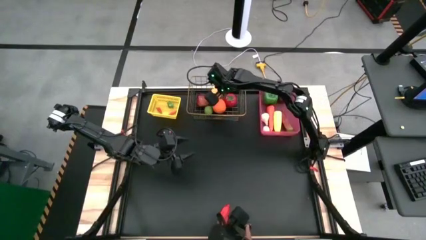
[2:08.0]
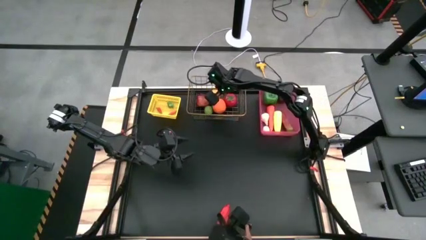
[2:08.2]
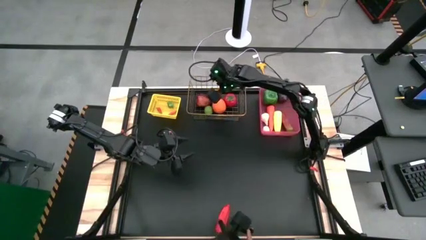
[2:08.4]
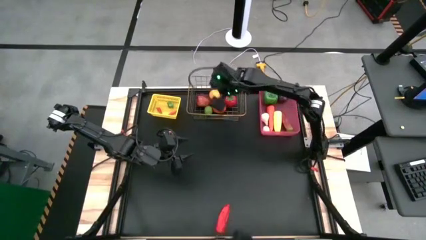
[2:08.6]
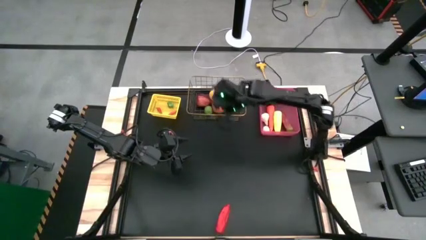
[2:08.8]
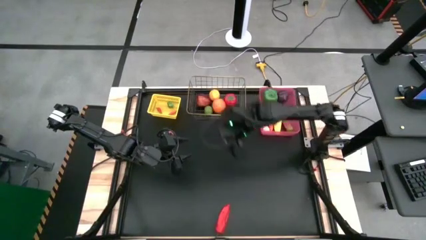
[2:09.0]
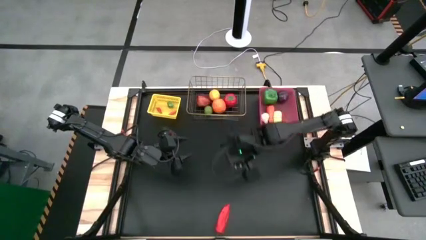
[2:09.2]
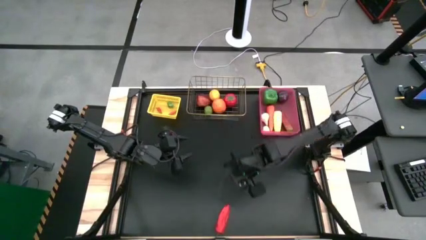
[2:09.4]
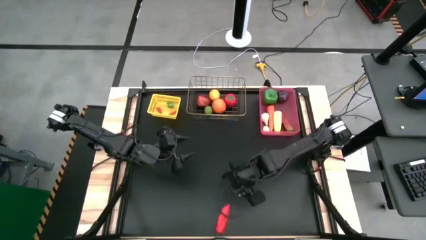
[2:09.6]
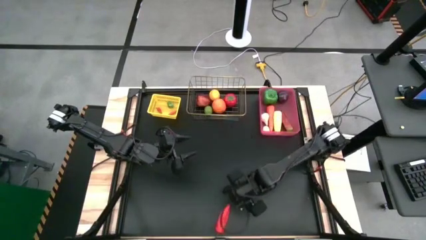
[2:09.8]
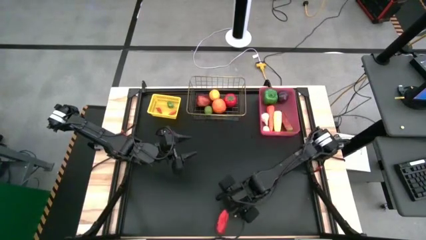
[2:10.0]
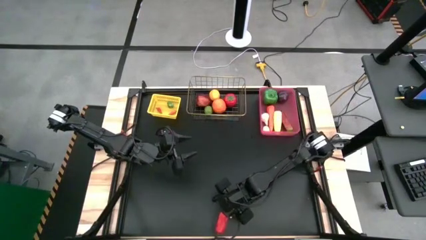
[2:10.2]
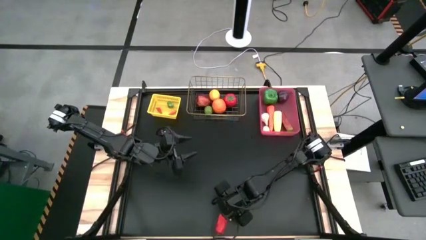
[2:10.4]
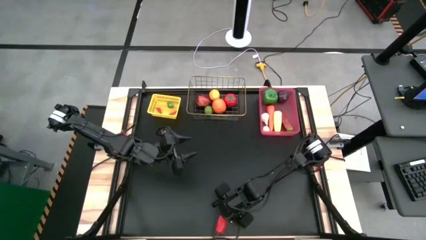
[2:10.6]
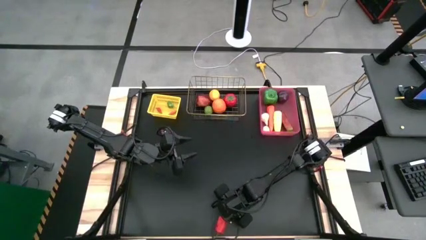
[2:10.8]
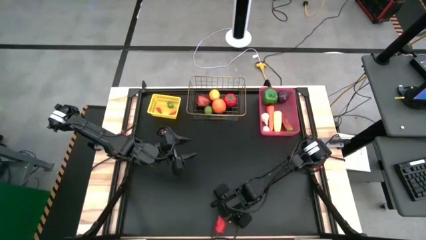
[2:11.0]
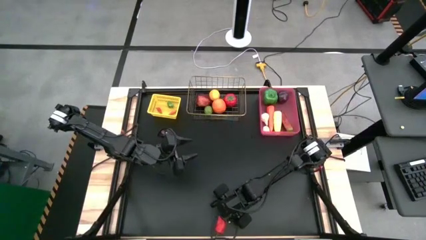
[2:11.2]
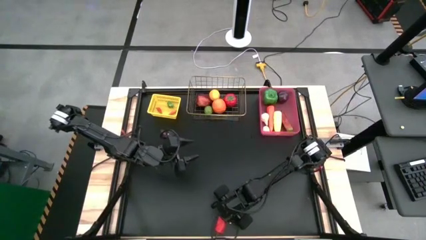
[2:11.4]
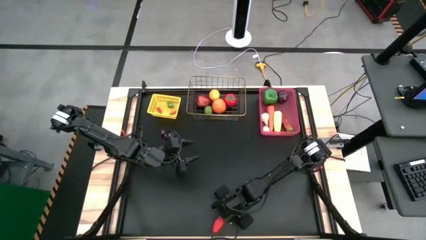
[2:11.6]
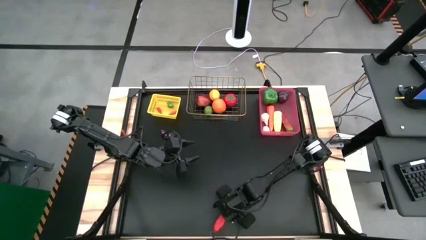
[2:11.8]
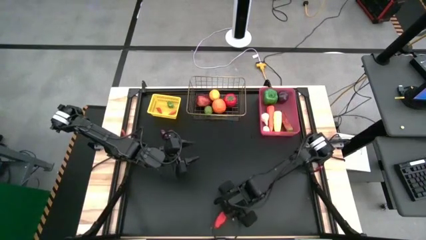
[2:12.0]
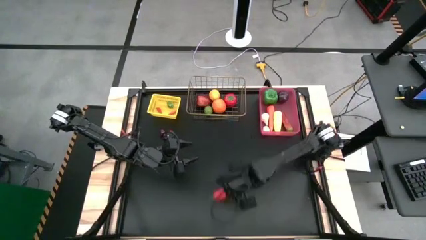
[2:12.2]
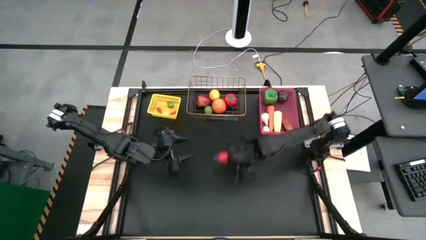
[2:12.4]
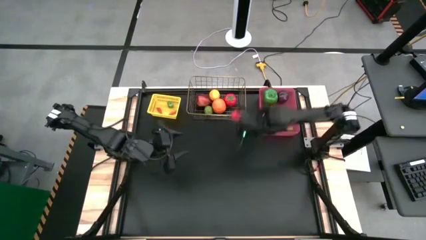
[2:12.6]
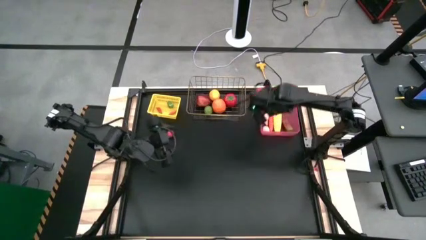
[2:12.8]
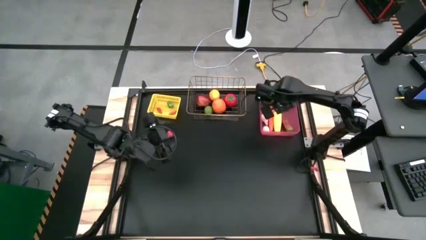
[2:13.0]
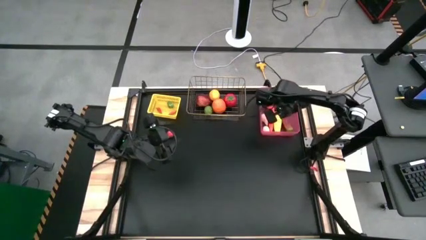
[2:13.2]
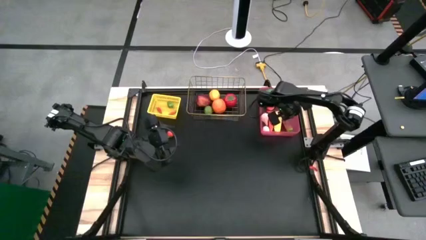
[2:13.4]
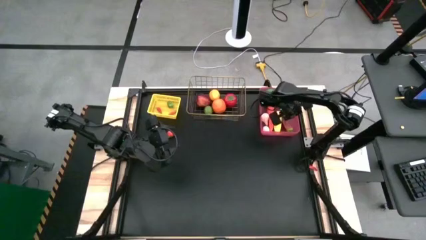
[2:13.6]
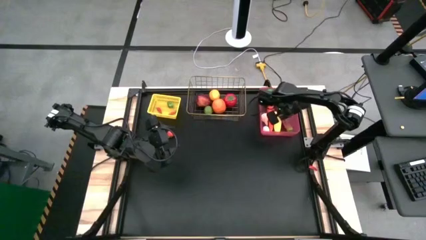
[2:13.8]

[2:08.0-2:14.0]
Task: Sort produce into baskets
Put the large red chili pepper into the pink bin

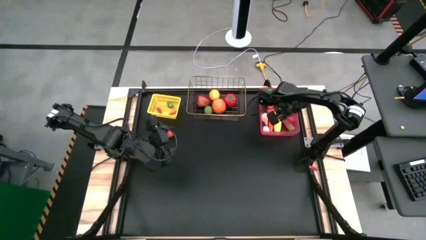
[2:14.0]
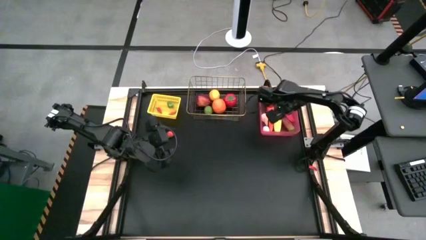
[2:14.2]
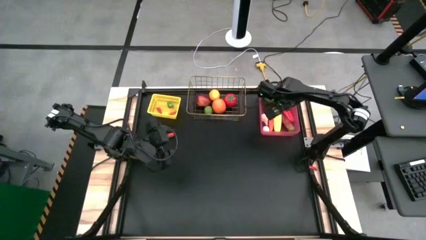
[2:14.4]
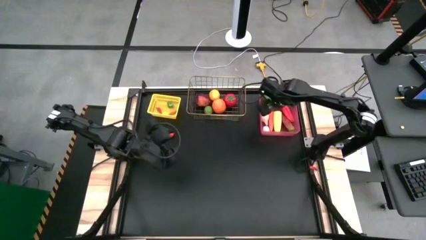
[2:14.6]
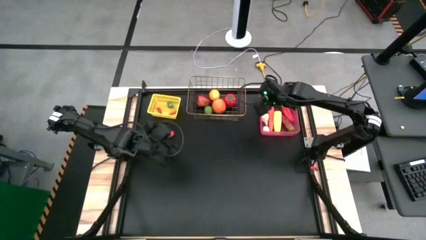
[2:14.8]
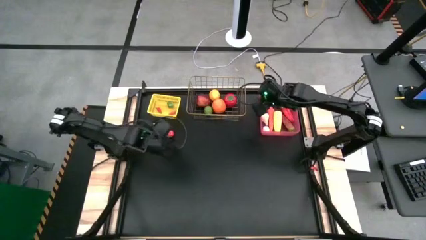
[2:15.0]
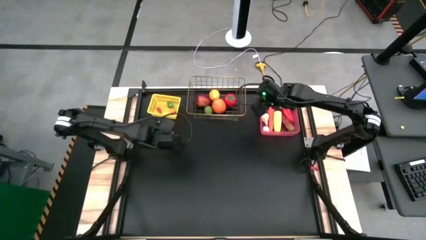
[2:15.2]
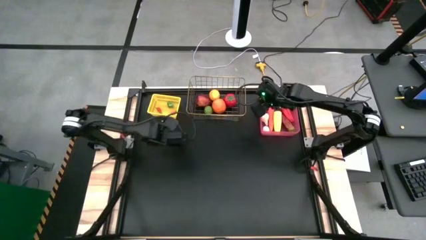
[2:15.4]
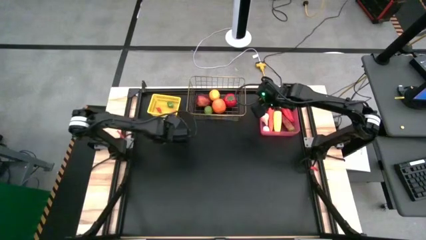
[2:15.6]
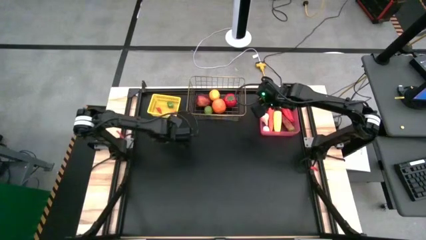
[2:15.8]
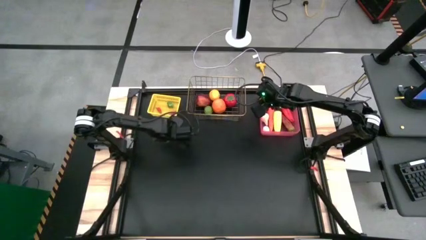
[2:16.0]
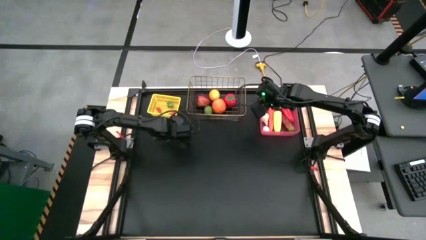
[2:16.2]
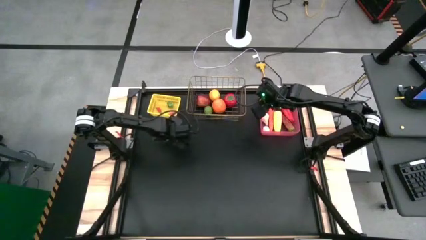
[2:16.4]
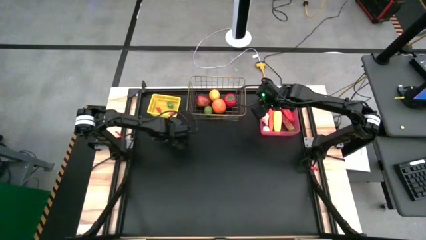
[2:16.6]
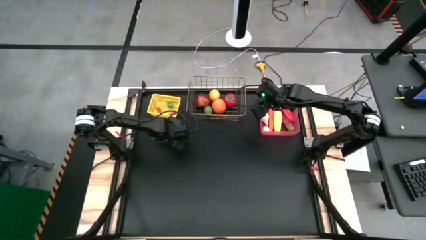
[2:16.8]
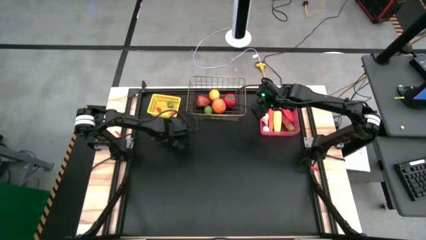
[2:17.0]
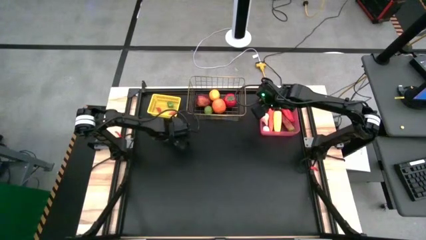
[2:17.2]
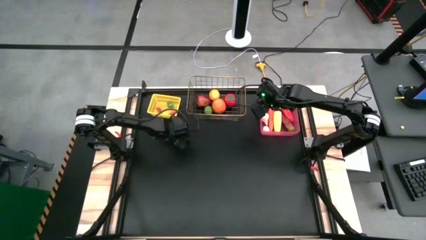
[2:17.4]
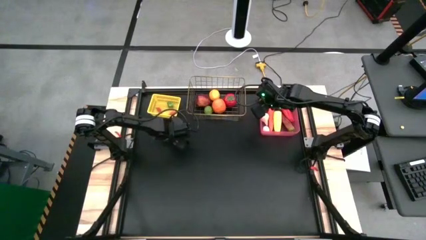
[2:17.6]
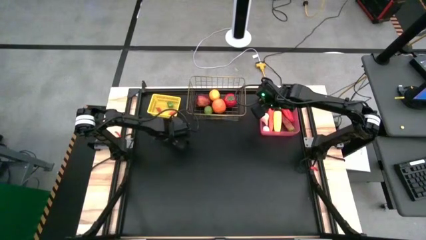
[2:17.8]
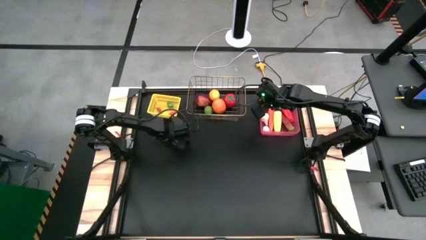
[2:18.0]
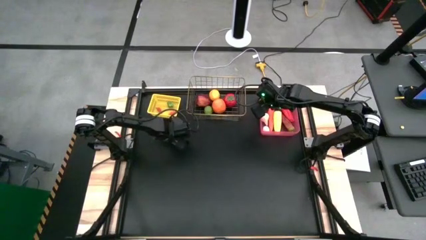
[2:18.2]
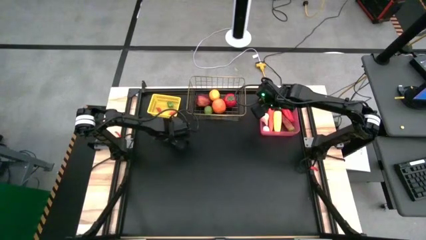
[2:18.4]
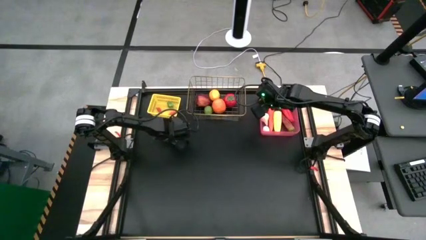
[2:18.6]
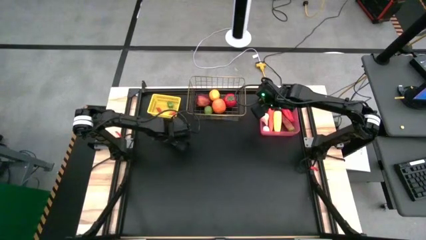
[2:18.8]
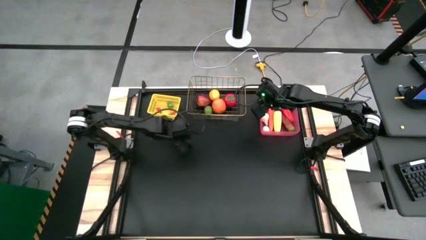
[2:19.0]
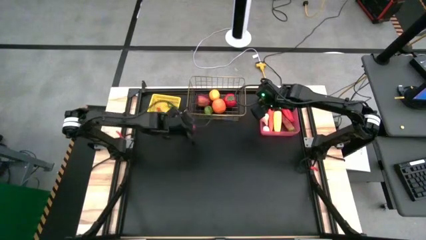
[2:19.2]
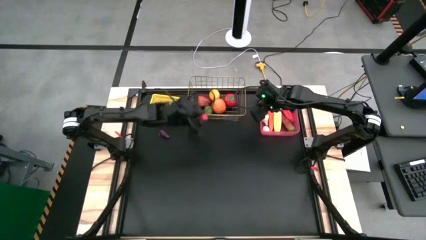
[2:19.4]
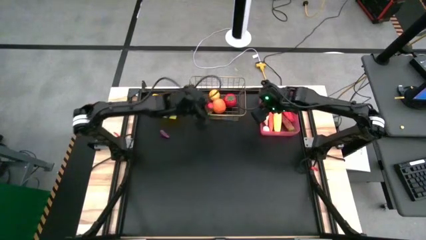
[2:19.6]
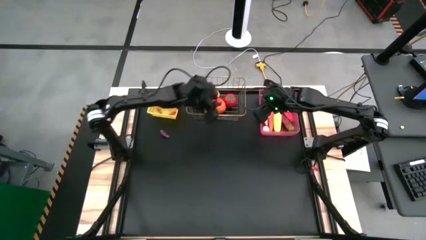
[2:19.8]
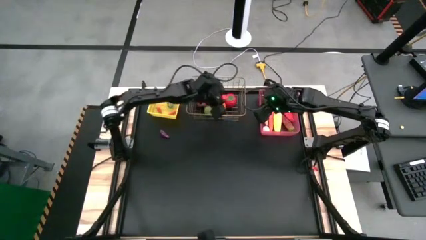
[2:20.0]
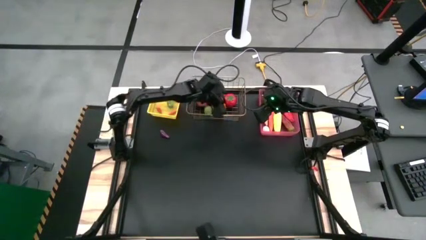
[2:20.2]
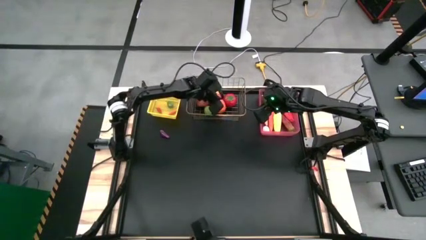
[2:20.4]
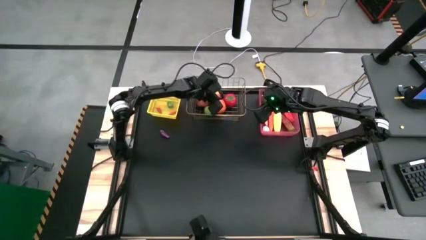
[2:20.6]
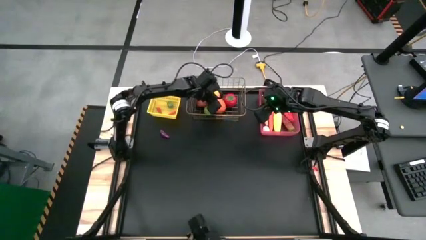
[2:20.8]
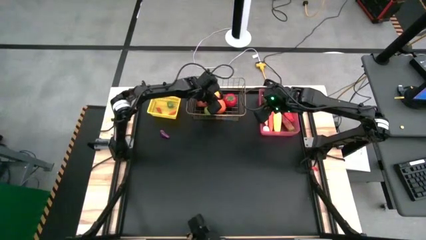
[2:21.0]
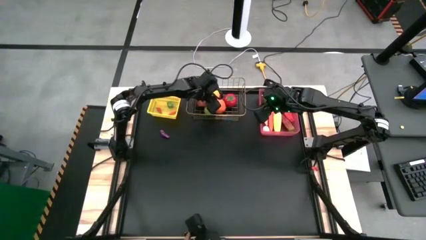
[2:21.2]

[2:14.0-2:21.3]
Put the red tomato into the gold wire basket

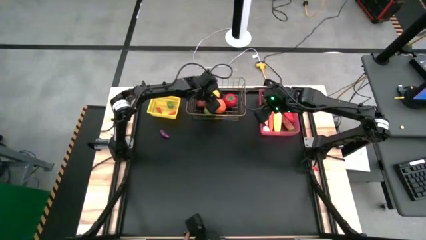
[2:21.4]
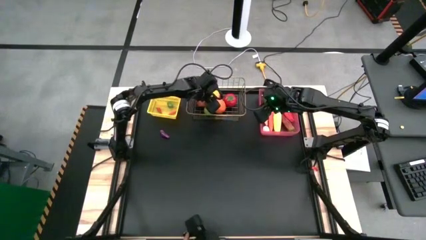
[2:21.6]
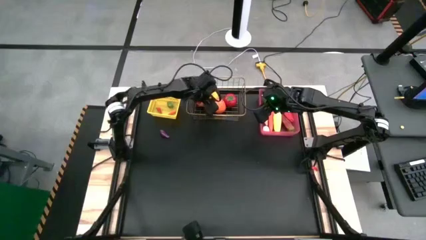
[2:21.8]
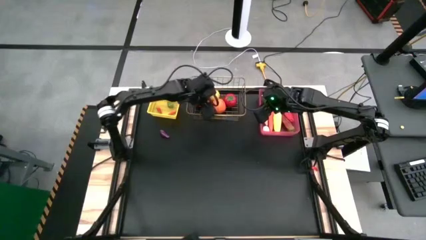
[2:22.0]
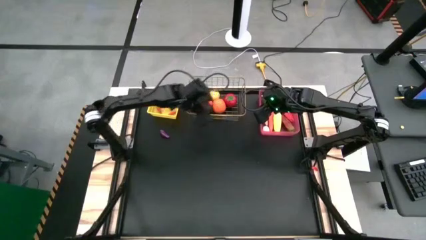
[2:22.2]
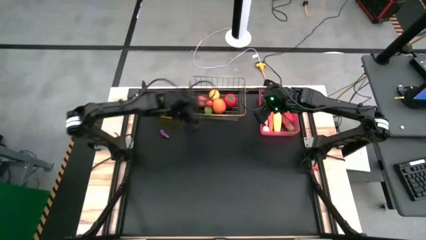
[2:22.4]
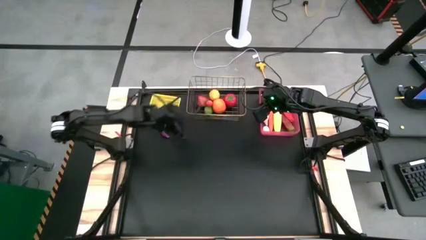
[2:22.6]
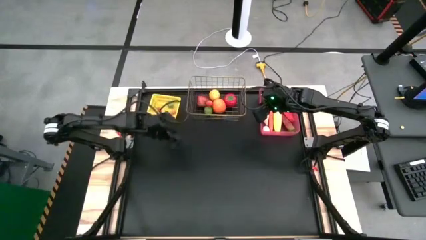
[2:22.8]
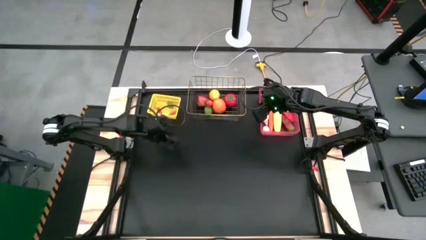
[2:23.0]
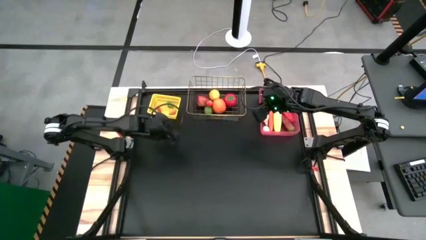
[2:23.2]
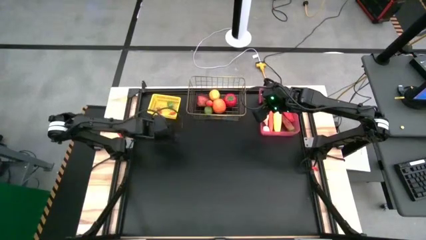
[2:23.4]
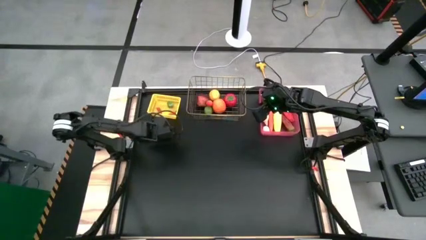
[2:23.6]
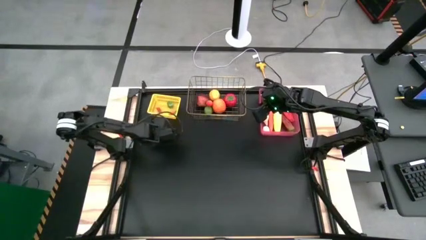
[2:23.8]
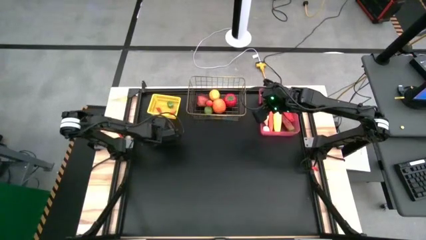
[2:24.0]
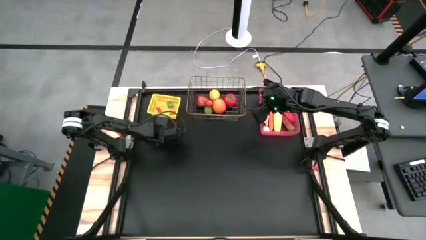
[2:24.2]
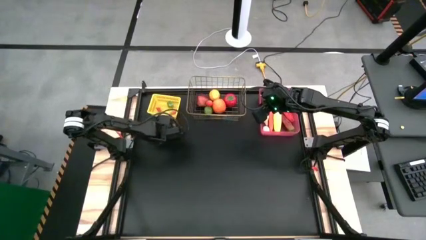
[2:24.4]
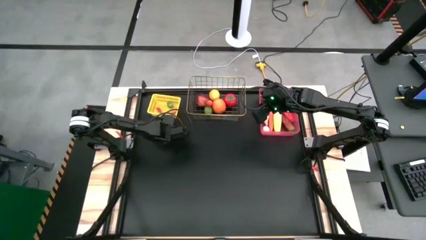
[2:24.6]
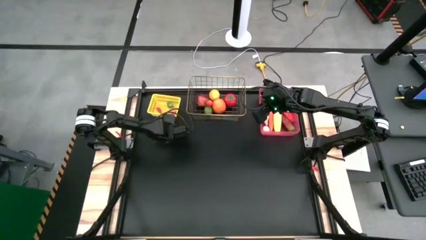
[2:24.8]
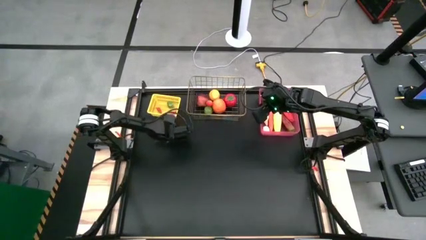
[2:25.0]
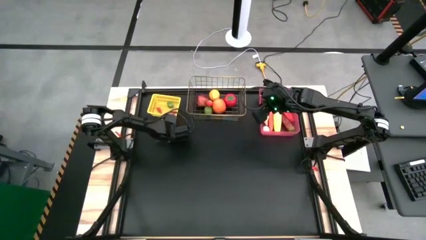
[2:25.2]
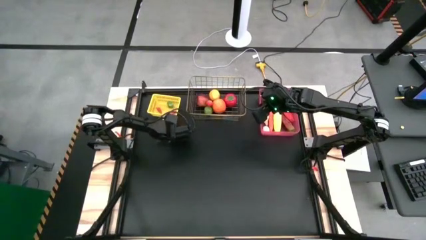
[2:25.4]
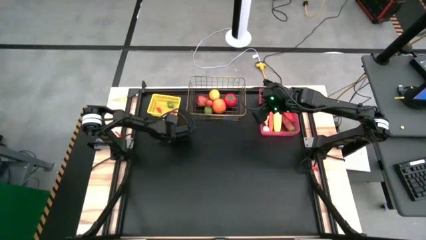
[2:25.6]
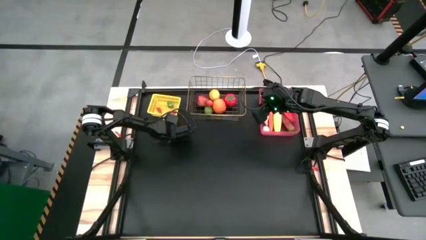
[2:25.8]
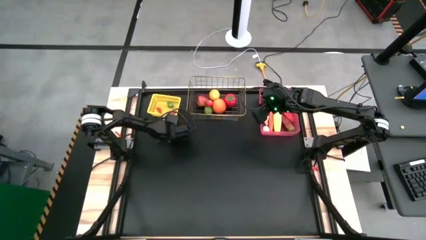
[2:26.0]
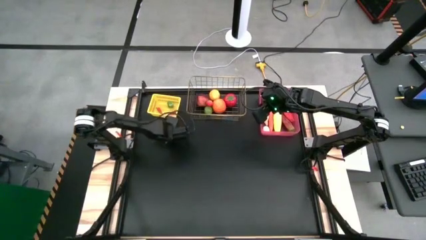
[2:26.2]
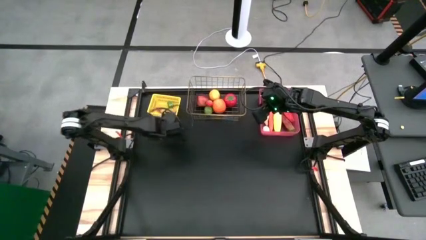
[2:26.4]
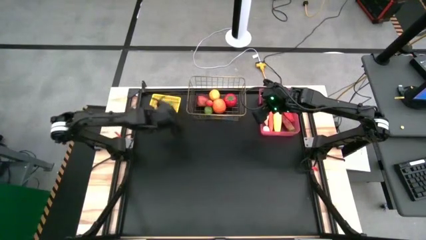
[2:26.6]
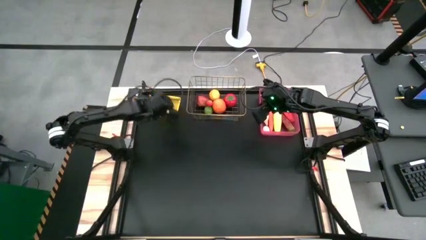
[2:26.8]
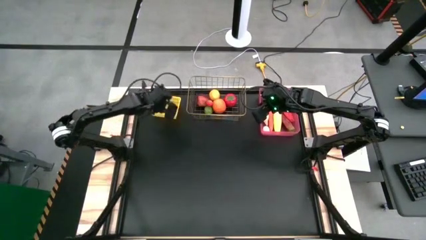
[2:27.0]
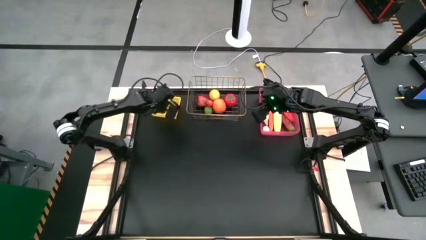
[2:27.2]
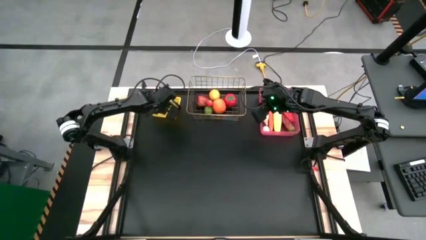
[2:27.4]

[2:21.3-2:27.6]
Put the small purple eggplant into the yellow bin
